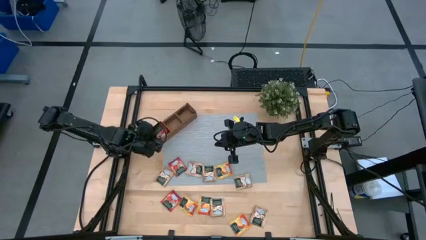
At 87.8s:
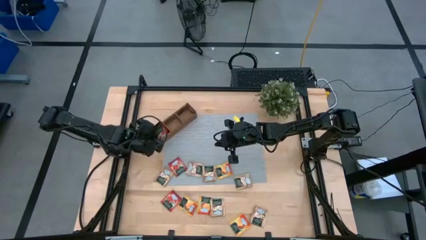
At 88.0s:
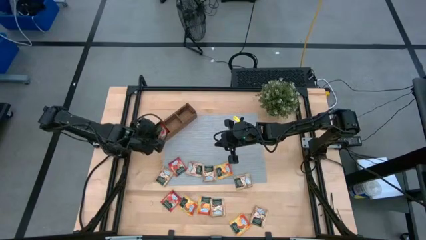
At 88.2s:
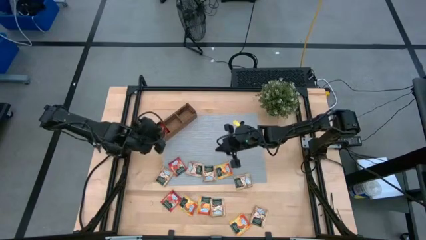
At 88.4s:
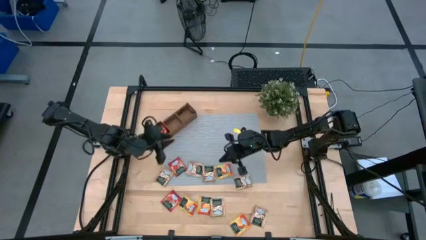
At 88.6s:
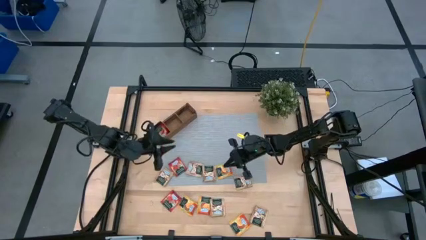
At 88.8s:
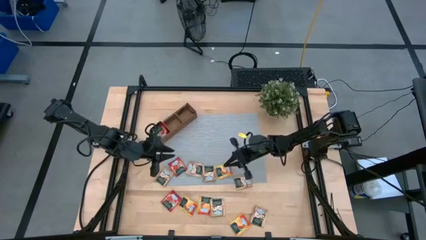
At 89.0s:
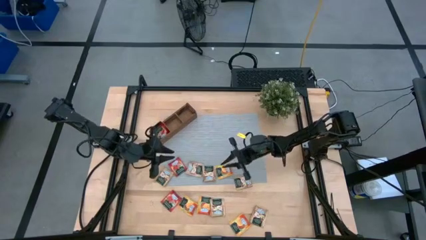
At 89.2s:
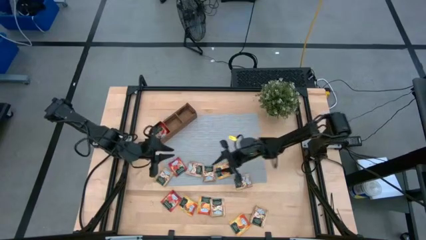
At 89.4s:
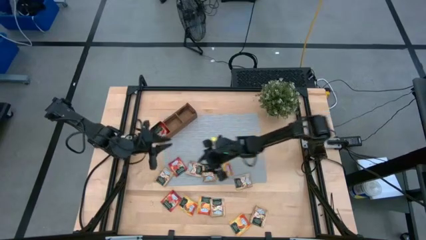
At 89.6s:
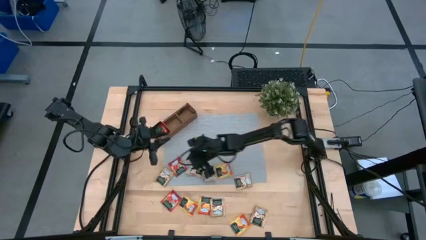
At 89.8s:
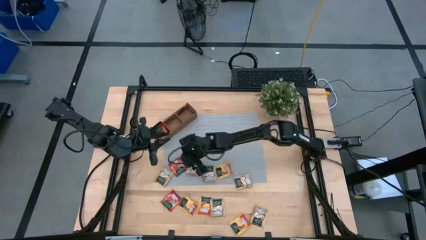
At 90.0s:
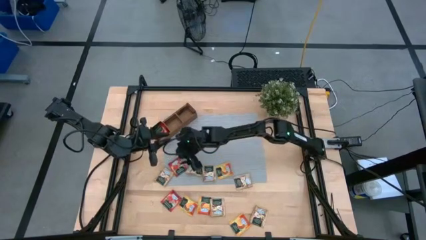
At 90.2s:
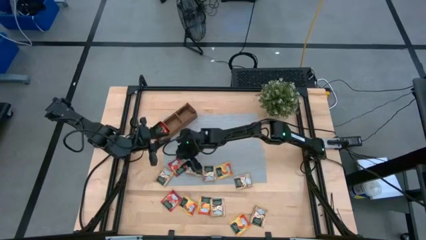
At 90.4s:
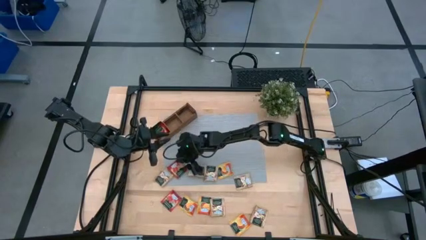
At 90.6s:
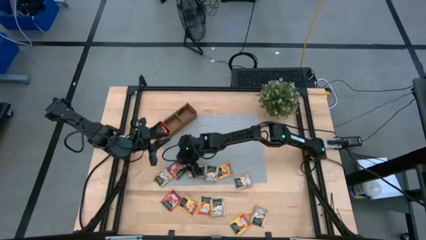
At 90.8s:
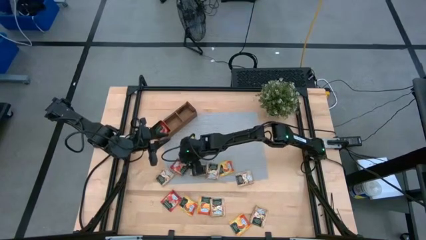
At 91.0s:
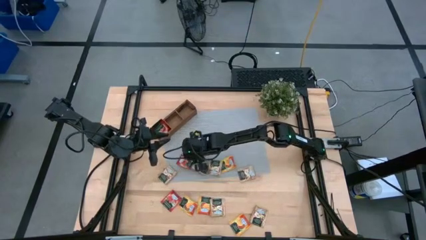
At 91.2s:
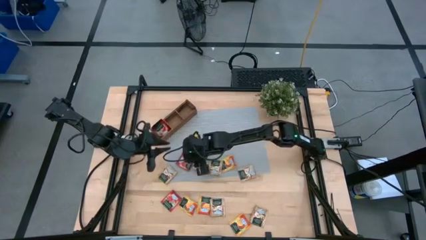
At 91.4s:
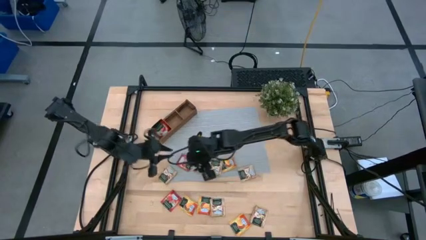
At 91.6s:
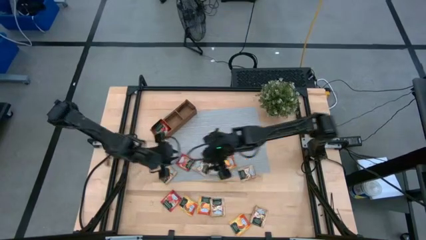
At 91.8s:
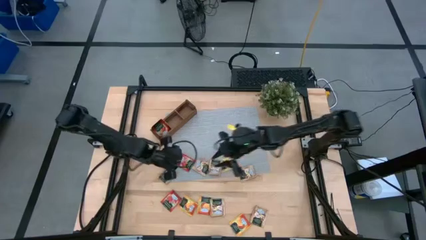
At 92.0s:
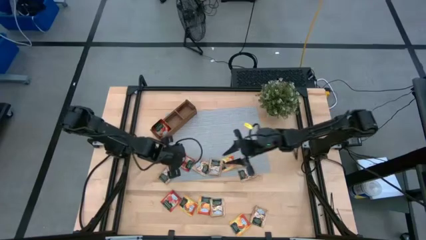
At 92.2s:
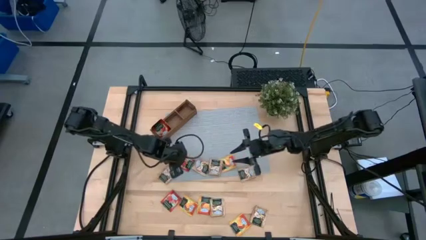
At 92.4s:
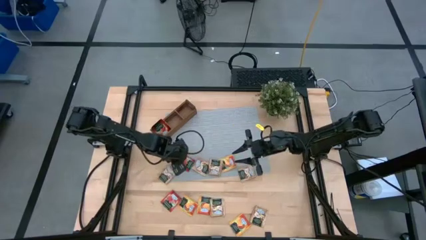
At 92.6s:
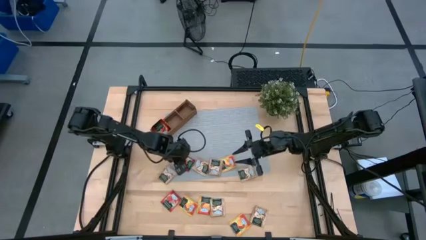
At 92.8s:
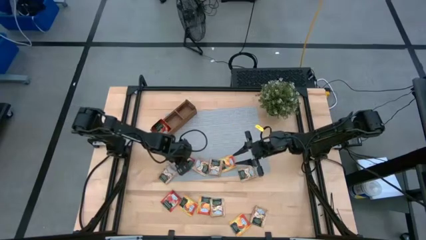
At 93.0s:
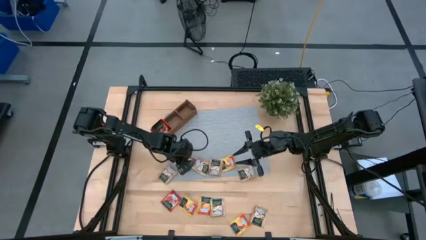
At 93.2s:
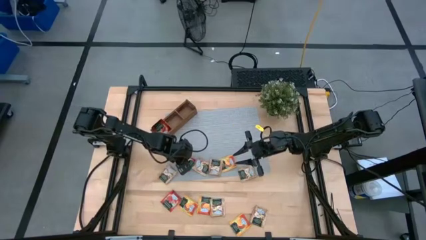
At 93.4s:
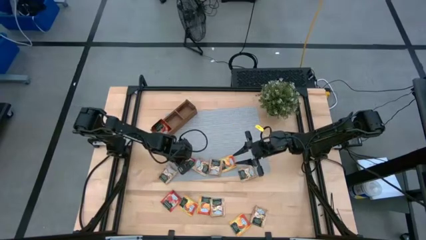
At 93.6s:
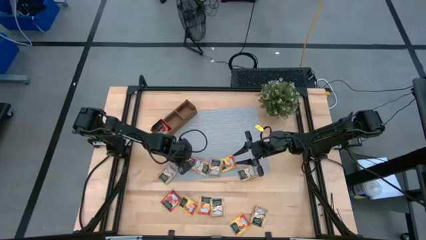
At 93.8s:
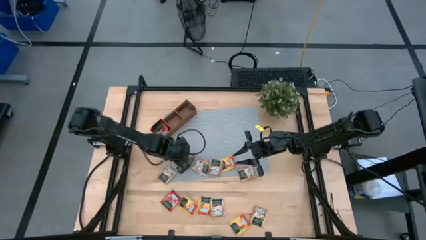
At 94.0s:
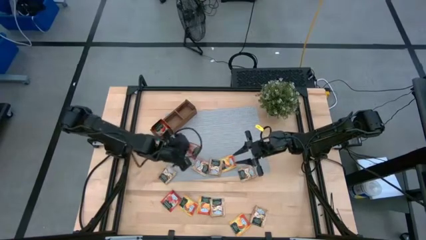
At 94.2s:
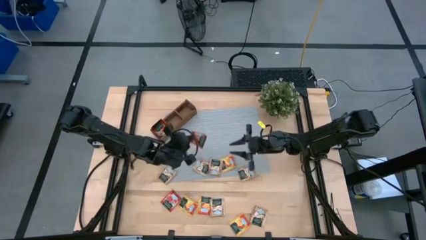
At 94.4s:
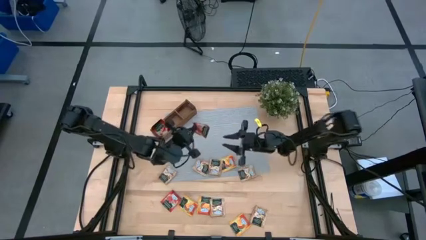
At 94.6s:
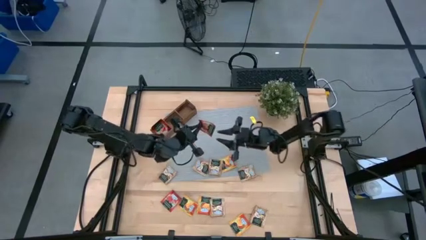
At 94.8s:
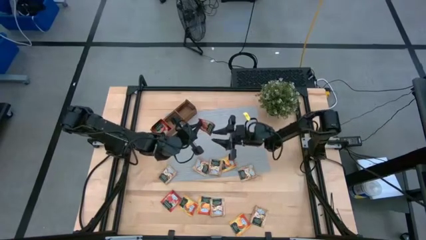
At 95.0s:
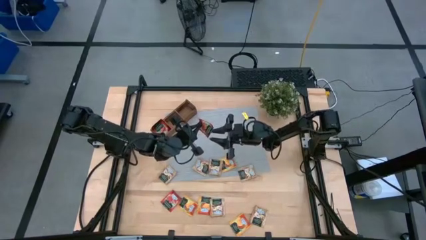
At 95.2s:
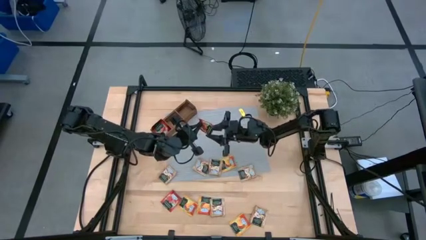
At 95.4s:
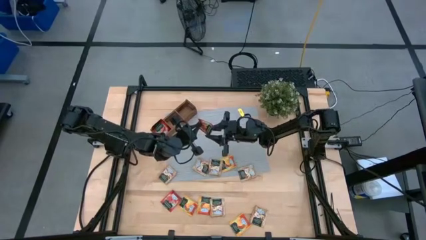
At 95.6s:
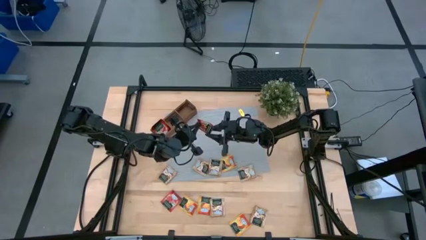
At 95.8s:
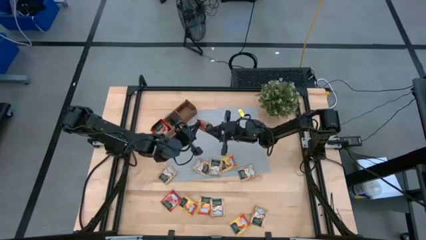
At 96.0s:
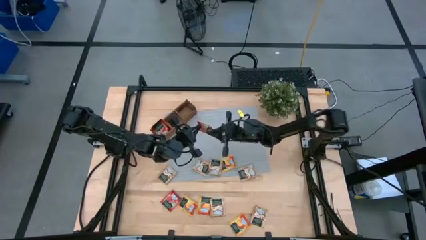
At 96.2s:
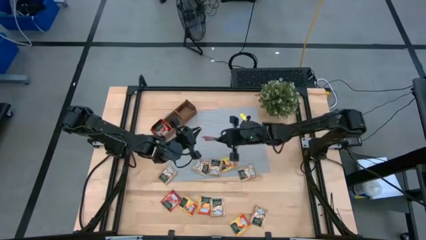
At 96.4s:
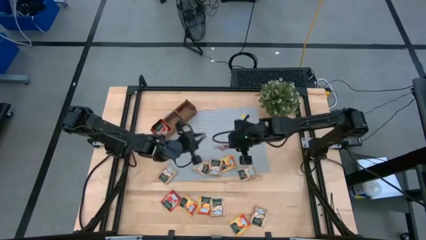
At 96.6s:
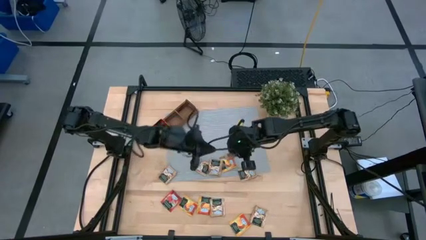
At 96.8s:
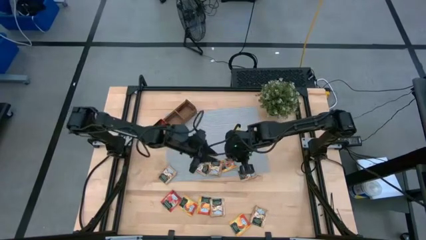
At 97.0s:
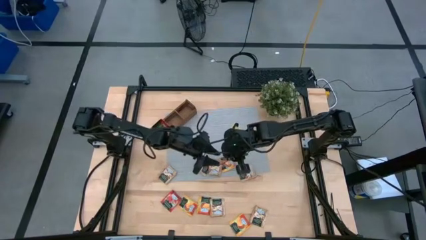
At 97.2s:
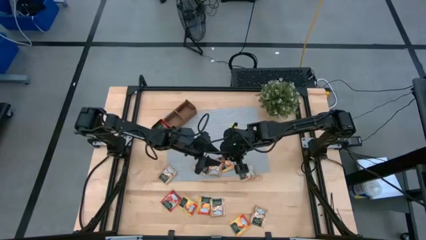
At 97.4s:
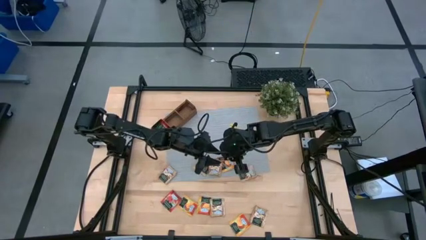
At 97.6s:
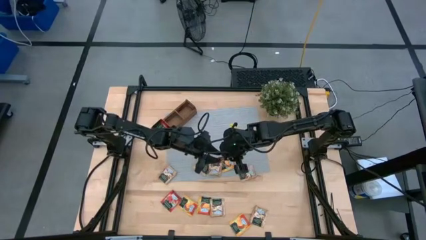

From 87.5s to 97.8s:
Task: Pick & Place Tea
Put the red tea bag into the left section of the wooden organizer

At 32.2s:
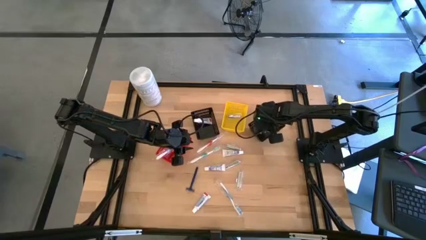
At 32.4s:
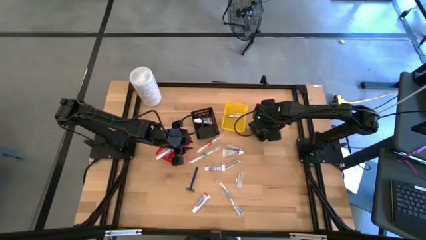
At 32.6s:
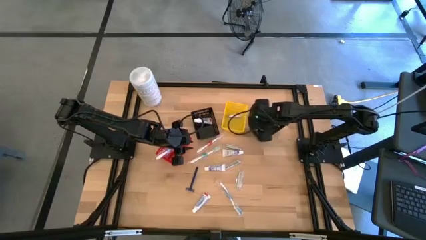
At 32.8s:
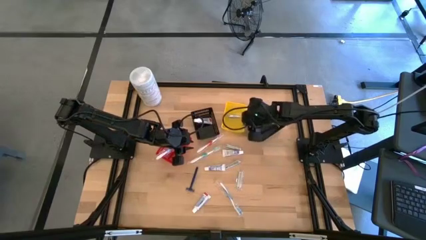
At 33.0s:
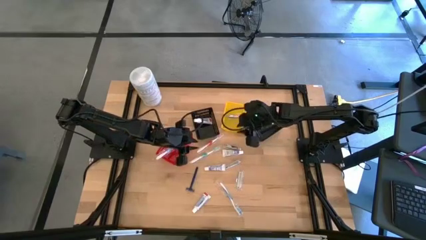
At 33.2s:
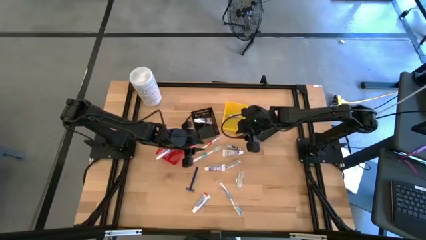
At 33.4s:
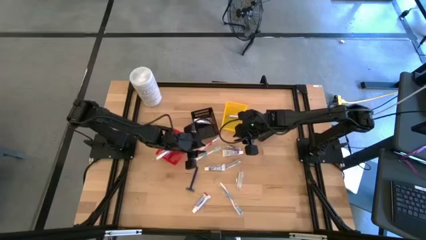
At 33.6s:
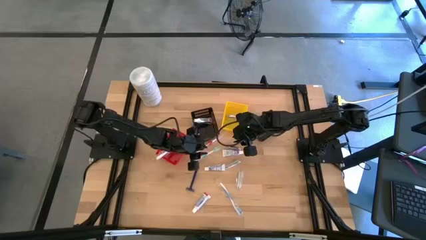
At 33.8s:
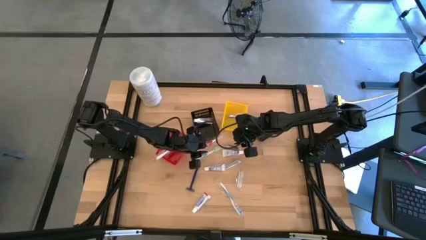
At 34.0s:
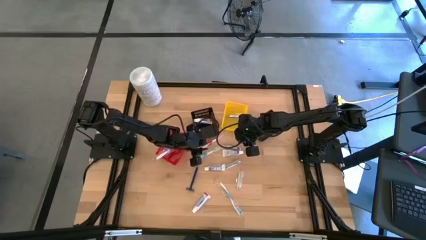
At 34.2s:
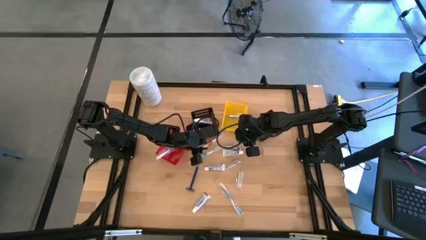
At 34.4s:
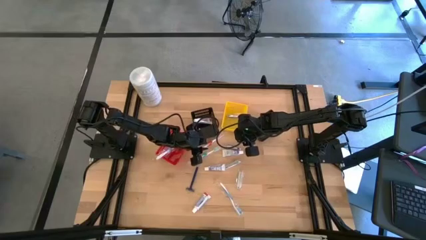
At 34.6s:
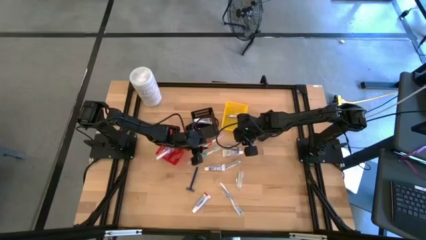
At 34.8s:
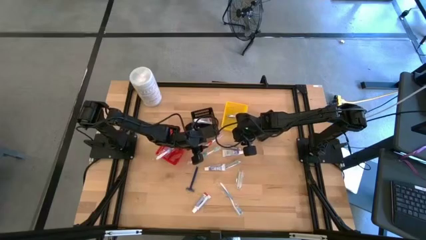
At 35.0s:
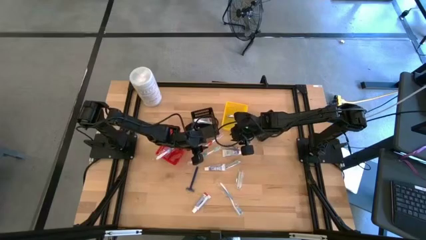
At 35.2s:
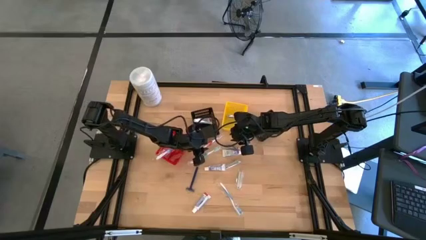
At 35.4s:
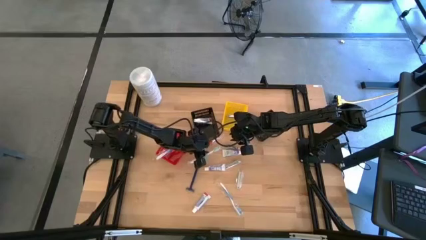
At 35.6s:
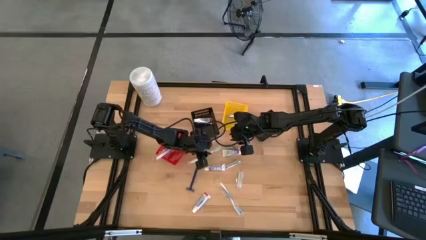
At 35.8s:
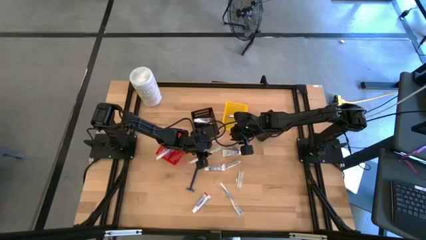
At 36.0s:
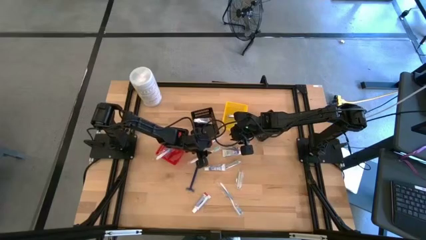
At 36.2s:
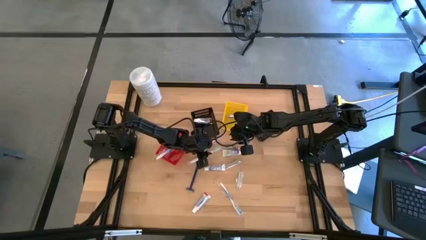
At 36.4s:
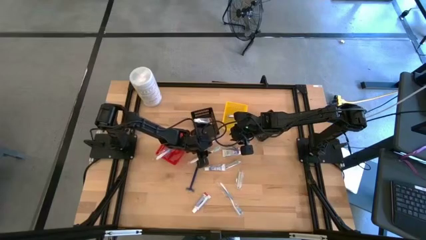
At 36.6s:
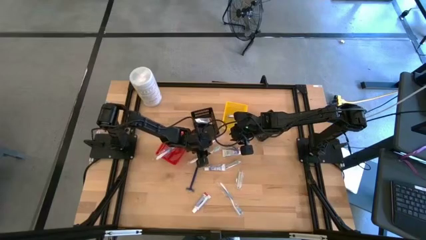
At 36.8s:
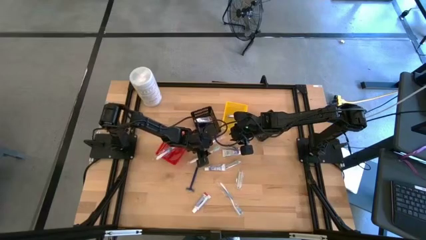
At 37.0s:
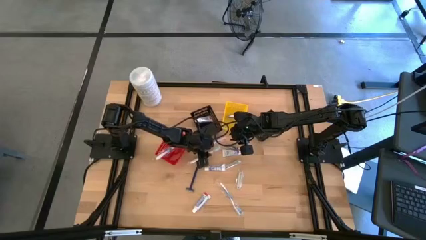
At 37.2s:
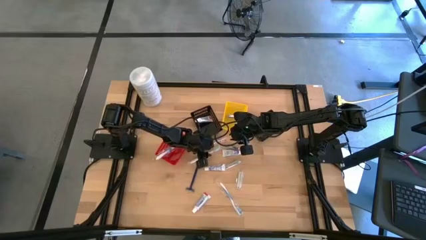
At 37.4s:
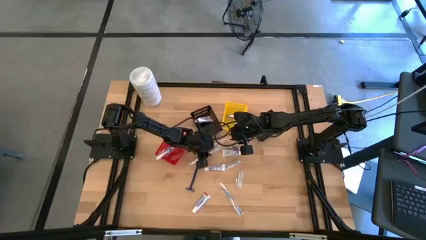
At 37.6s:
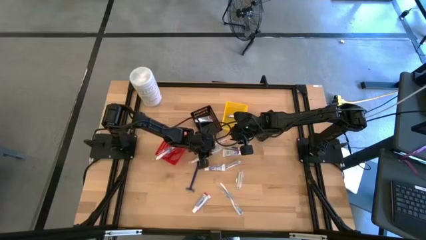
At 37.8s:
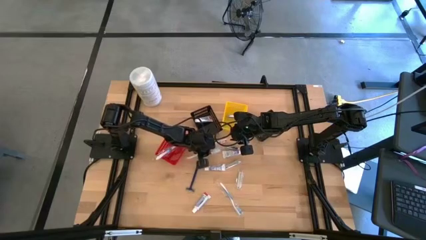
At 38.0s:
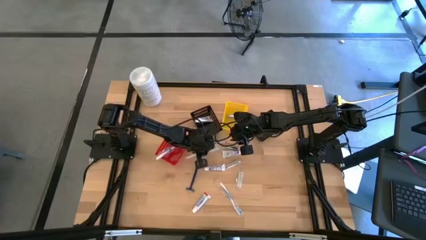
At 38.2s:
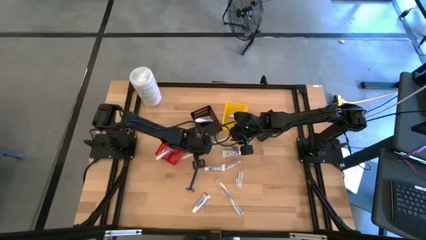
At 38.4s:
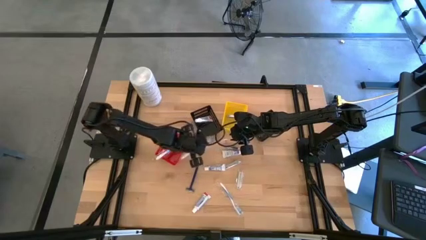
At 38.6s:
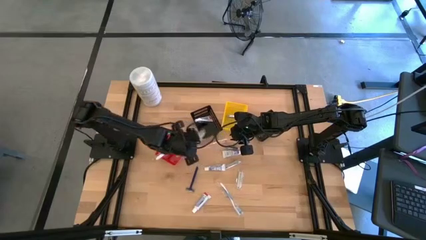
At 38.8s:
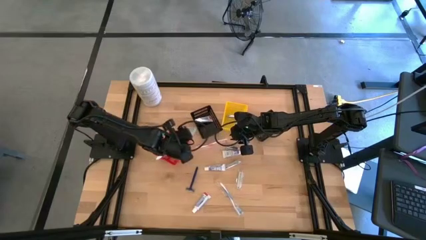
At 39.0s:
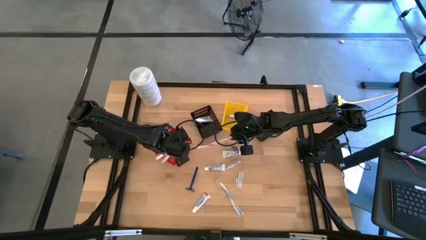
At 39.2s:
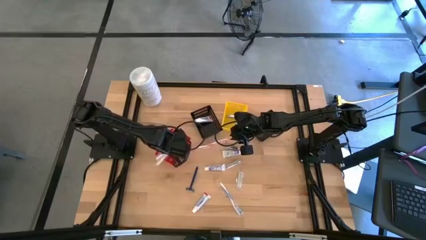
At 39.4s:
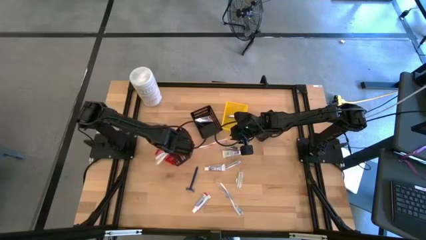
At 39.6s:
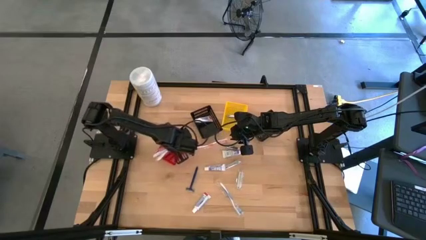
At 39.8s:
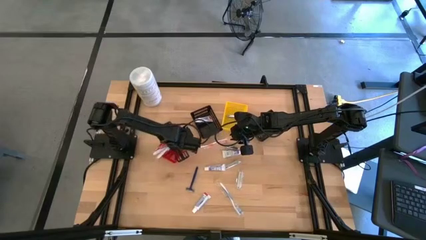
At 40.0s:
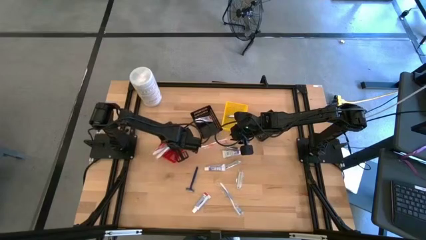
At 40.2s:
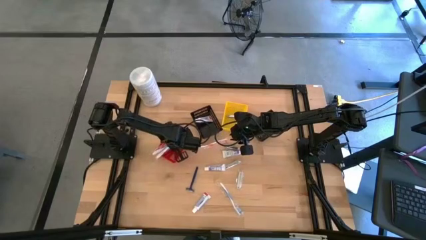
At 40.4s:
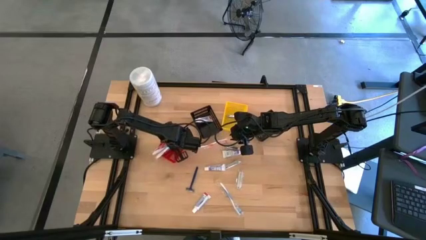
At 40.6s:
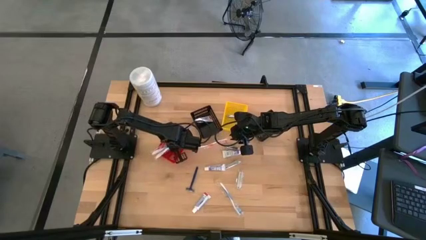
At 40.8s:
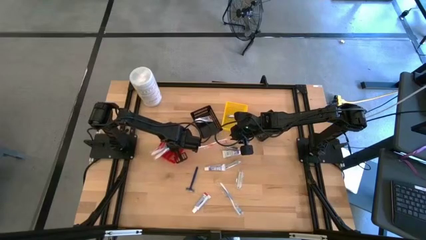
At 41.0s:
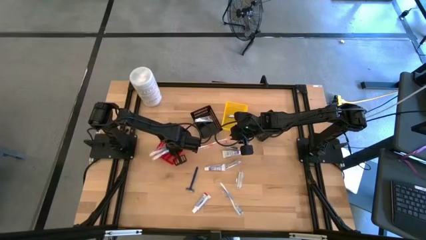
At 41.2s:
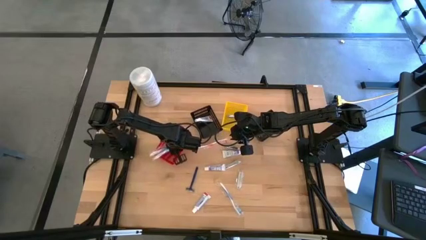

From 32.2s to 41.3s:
Task: Pick & Place Travel size toiletries
Put the green toothbrush into the red bin
